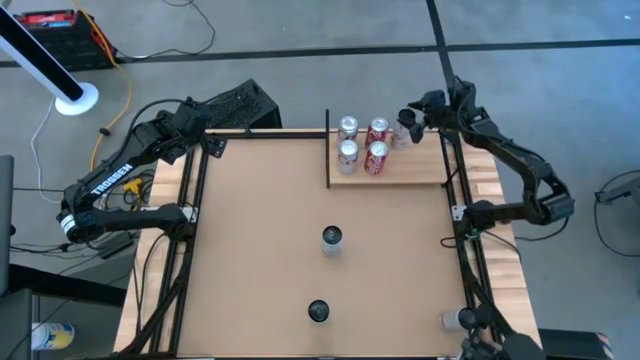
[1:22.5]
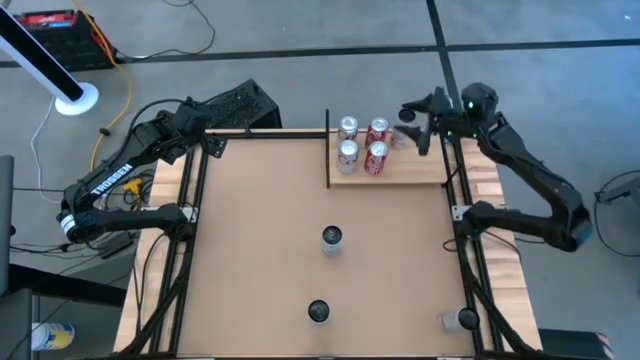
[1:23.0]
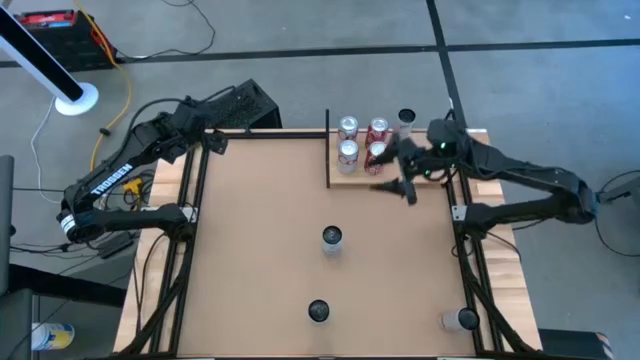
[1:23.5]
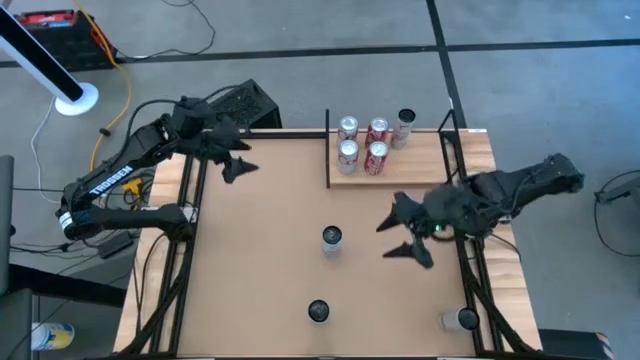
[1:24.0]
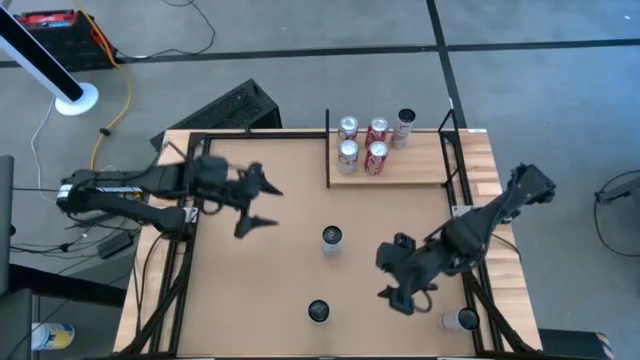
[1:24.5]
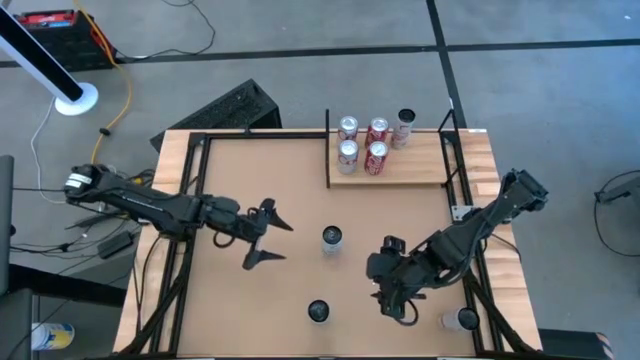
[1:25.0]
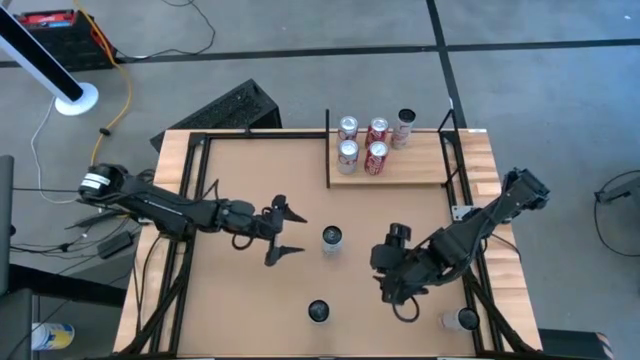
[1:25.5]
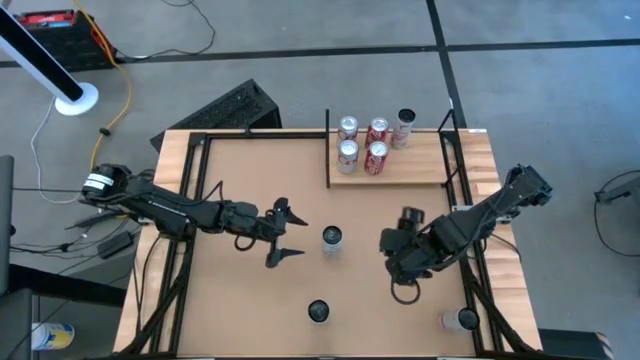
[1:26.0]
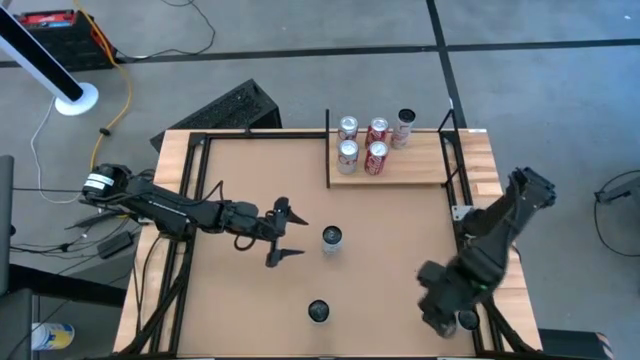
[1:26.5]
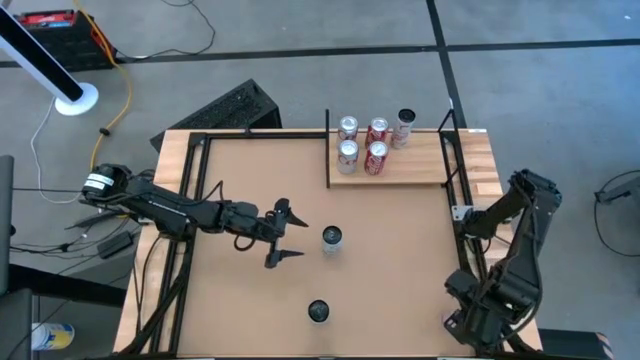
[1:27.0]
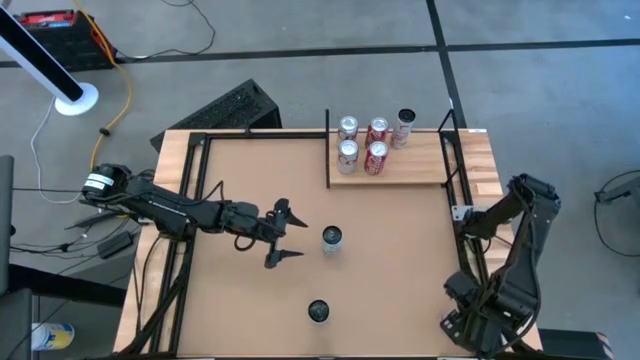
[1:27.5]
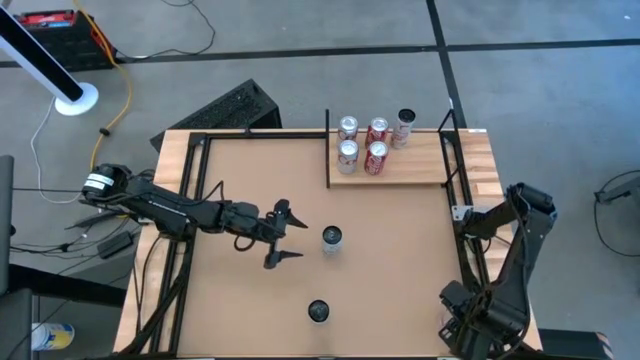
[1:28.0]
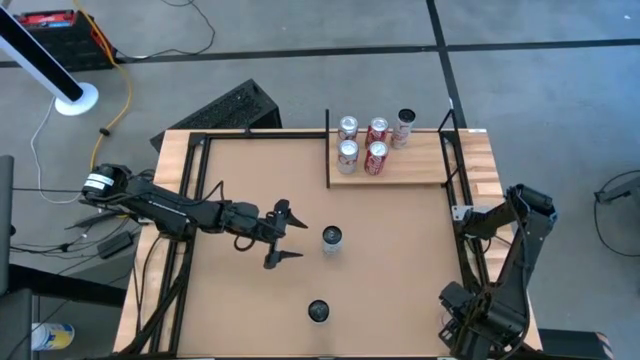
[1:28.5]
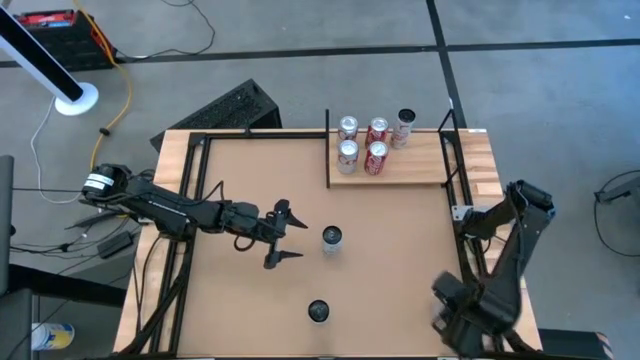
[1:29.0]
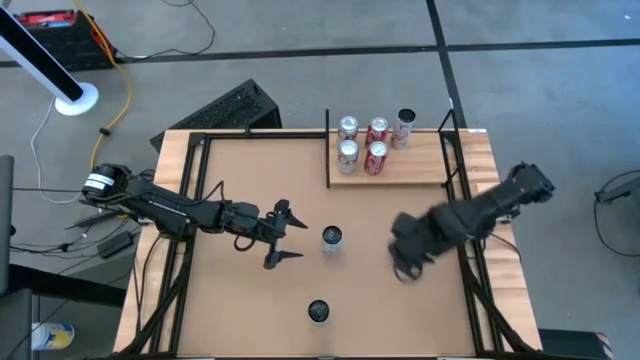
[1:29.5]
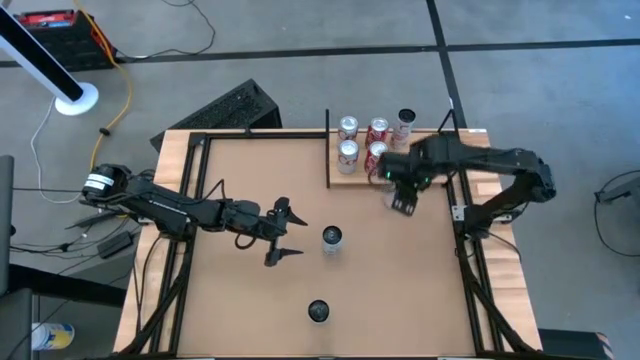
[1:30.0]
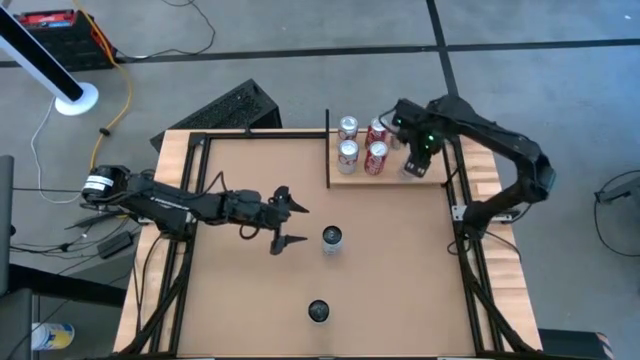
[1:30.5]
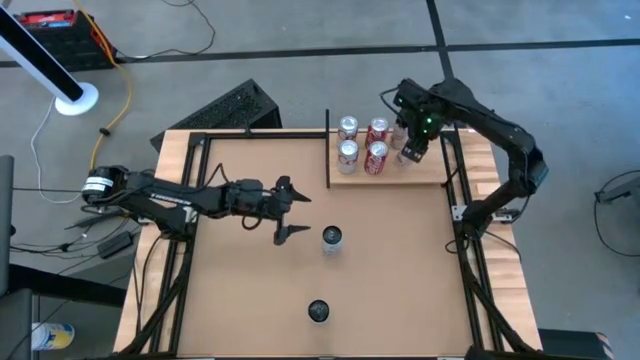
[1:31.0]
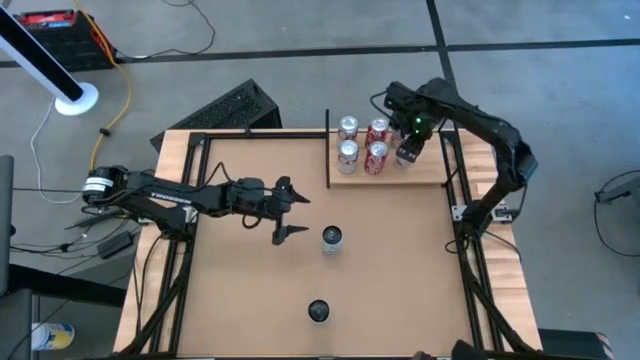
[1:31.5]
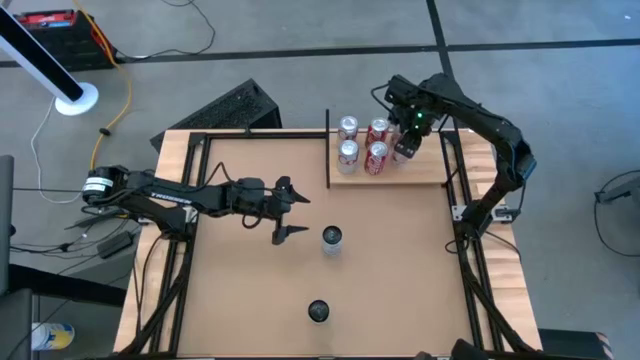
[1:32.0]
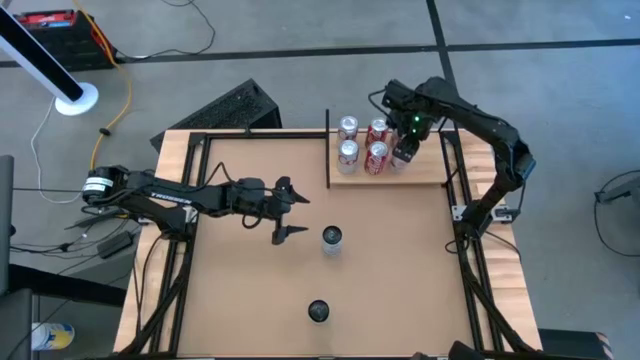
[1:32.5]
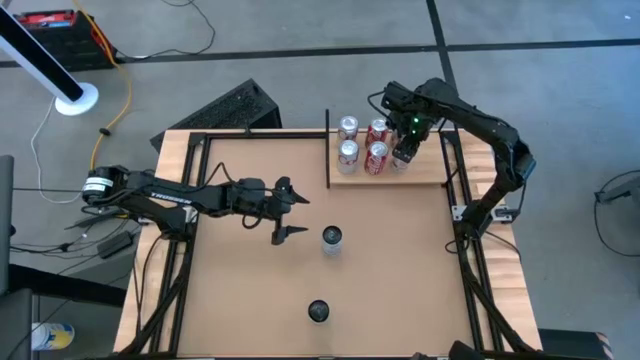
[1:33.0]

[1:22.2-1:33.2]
Task: Place canned beverage on shelf
Put the white-pink soda can on the shelf aligned with the other white-pink soda can

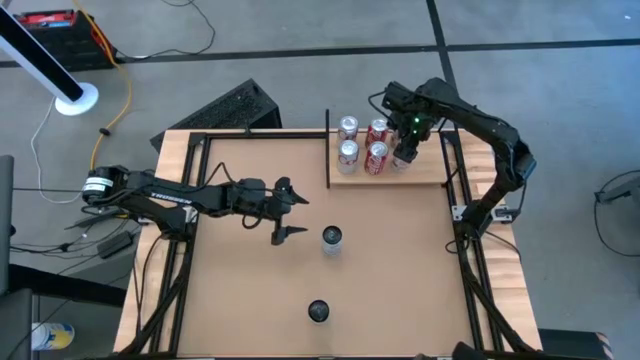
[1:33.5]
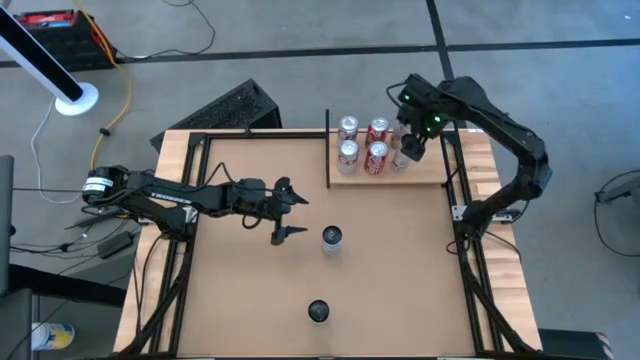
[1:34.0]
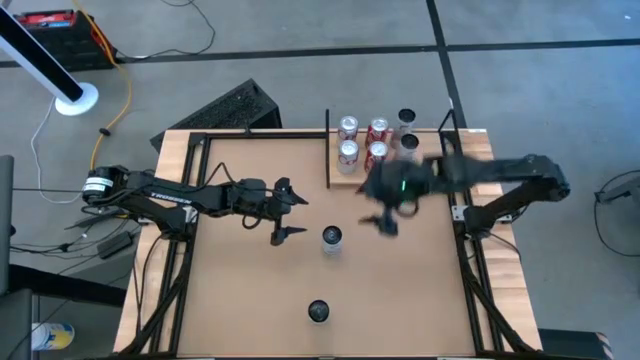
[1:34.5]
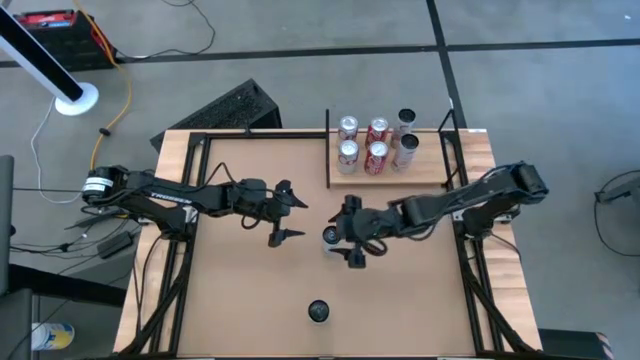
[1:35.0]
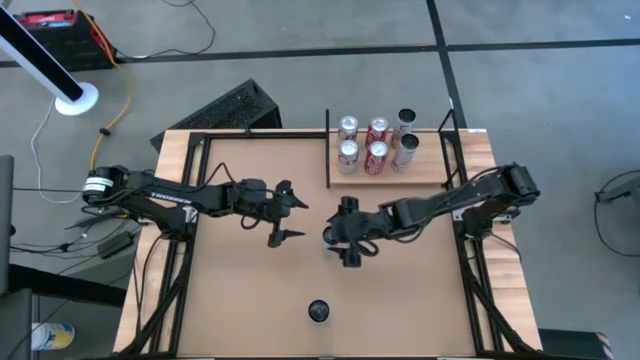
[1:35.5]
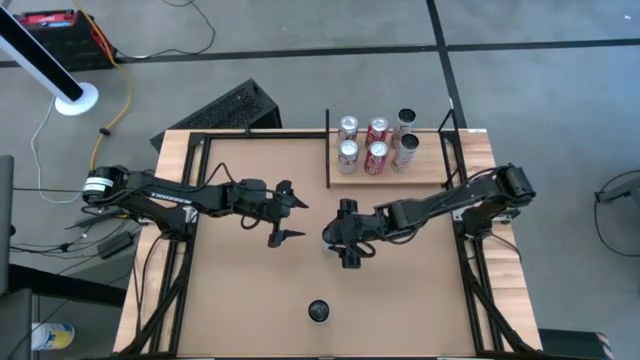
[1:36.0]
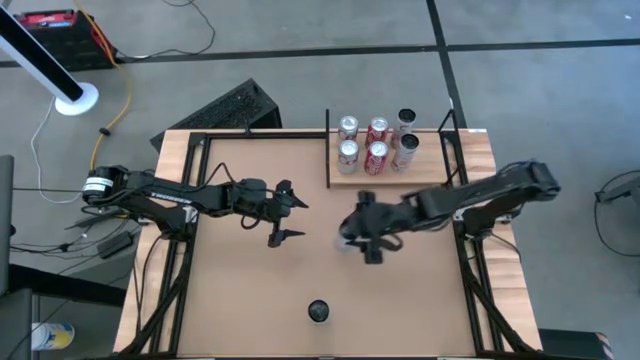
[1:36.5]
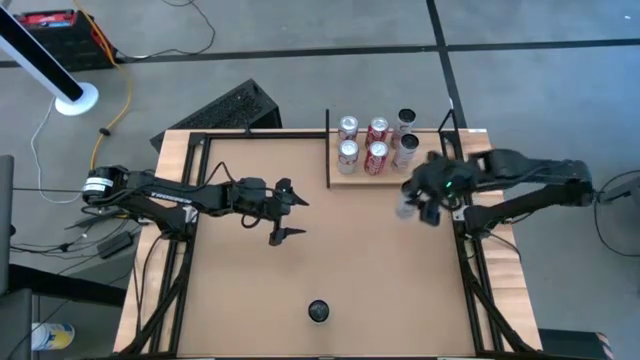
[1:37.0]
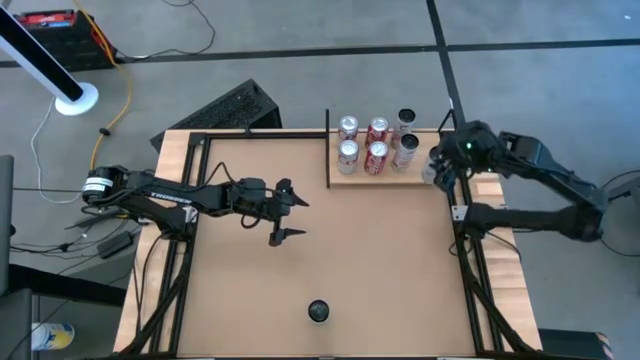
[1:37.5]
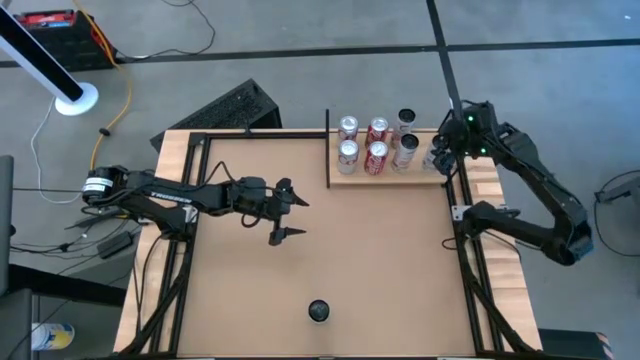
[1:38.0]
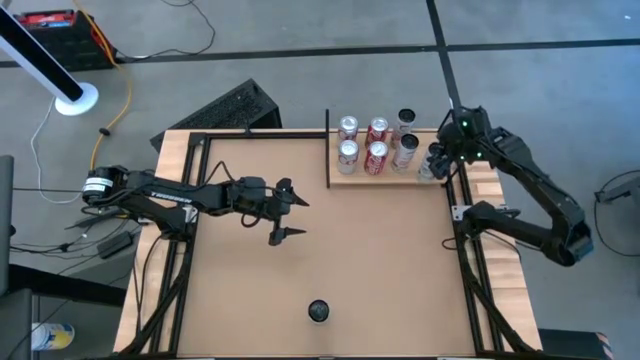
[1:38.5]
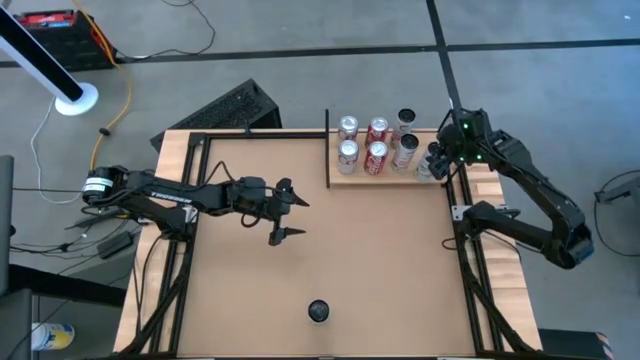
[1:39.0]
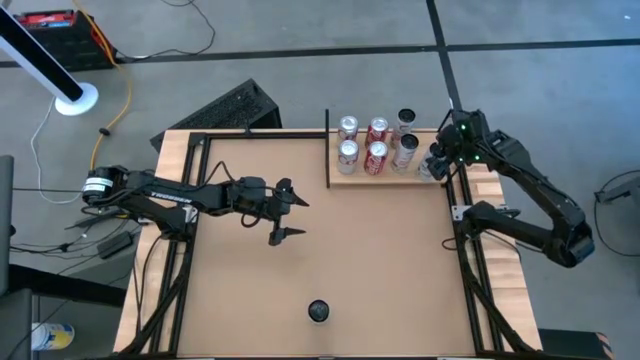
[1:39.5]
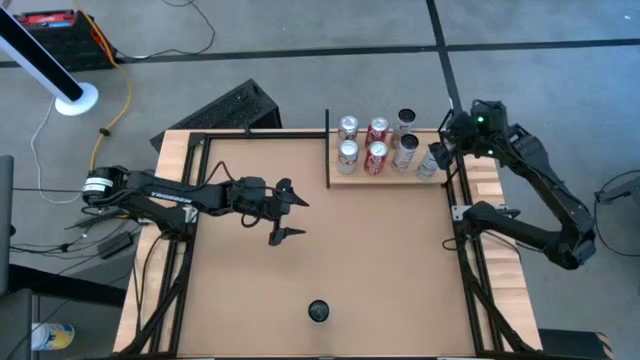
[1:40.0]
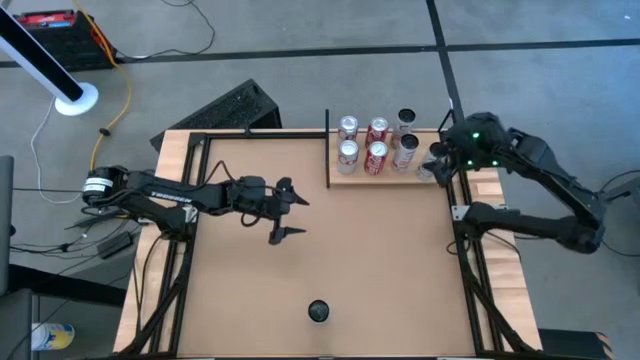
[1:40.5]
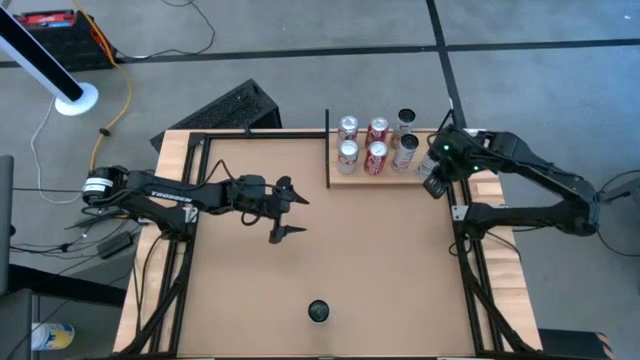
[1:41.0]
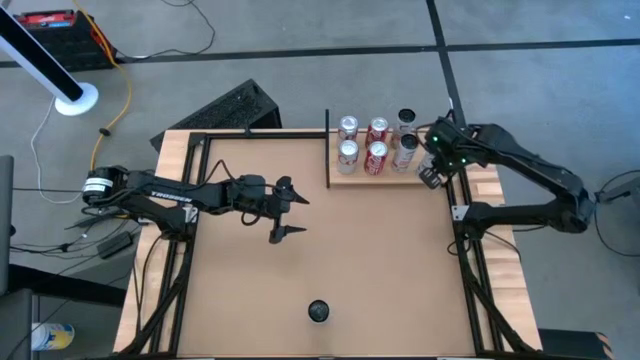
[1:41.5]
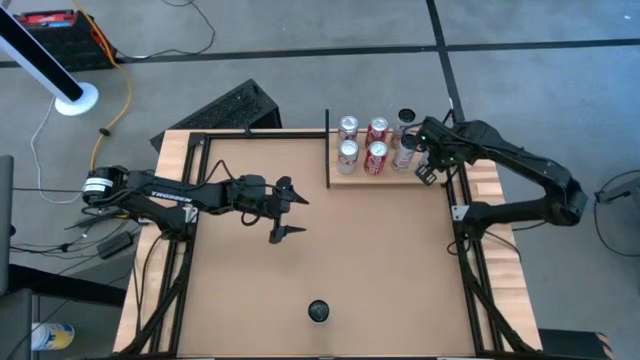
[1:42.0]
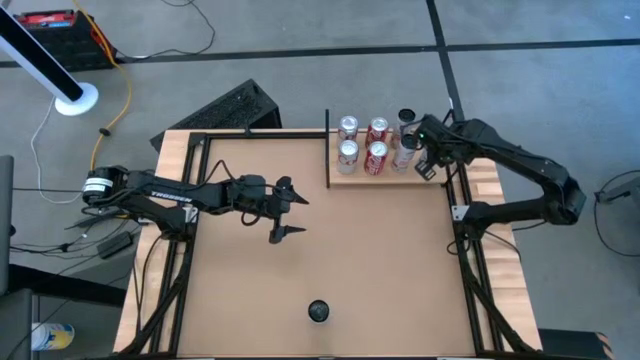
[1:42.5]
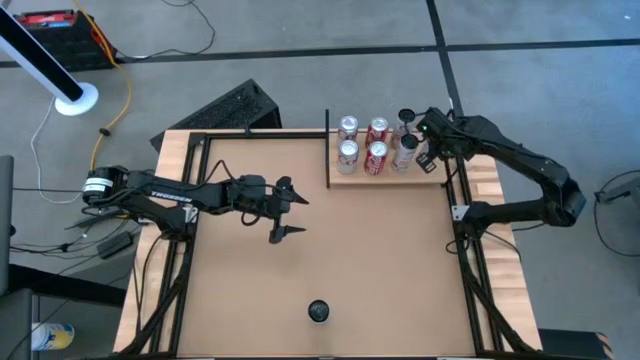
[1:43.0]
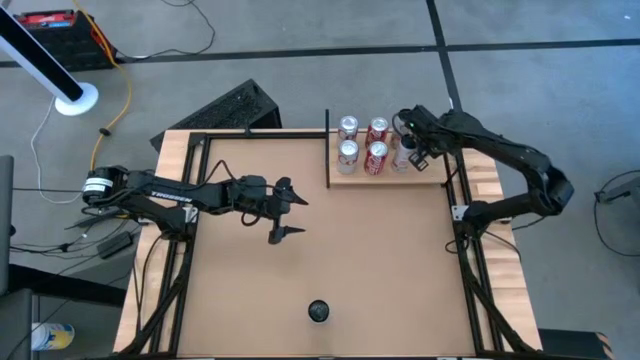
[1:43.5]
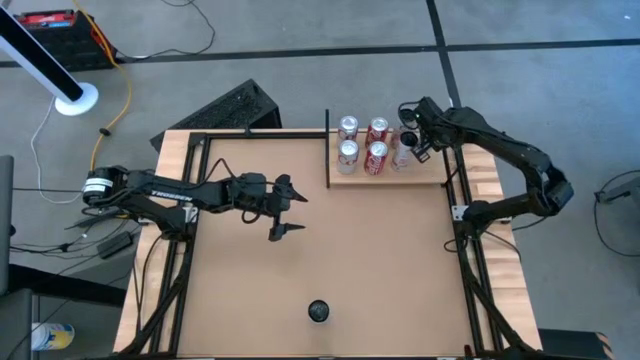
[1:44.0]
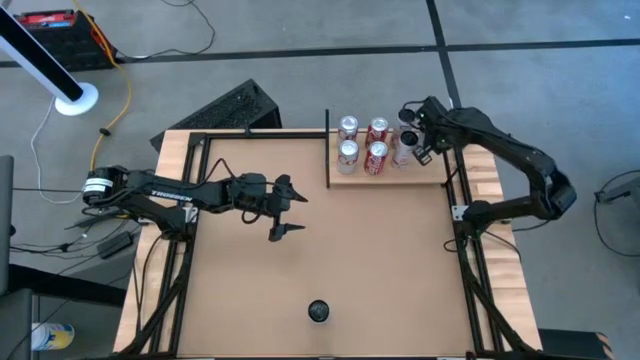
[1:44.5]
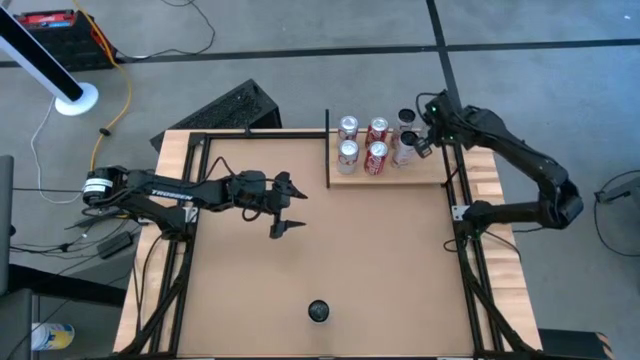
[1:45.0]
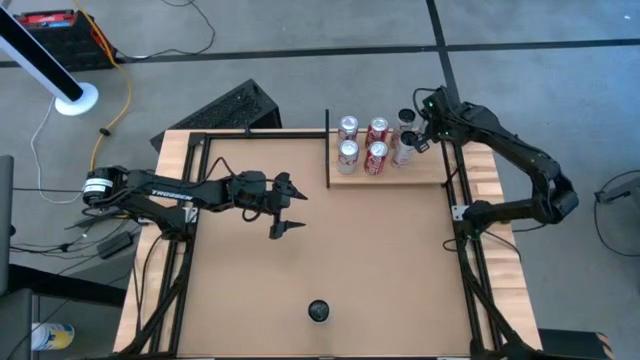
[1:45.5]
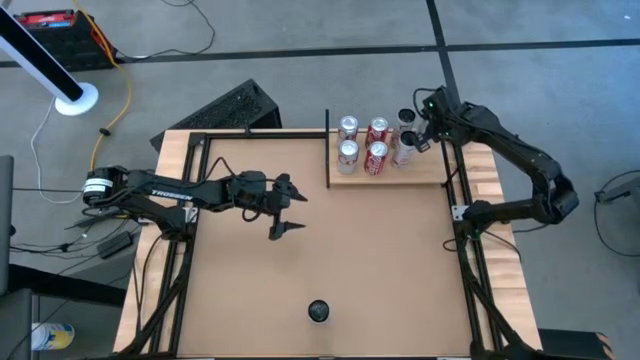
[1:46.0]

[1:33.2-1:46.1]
Put the top white-blue soda can on the shelf
